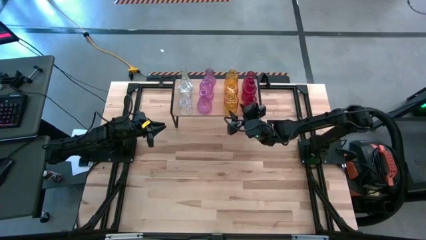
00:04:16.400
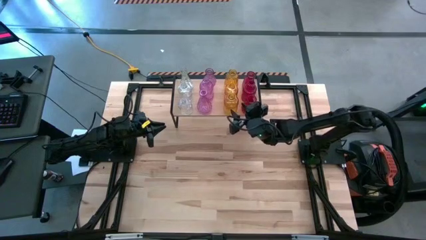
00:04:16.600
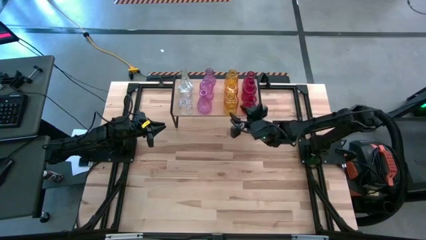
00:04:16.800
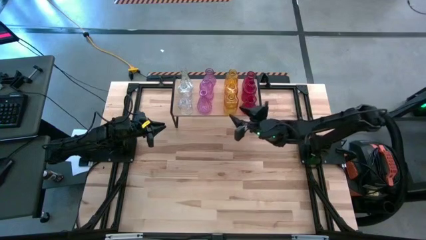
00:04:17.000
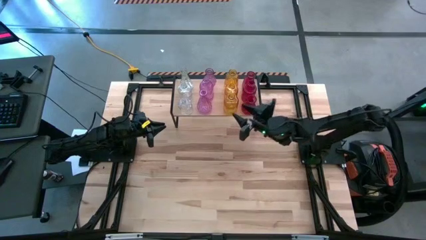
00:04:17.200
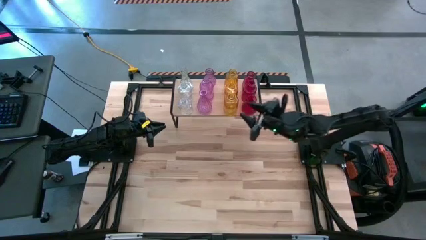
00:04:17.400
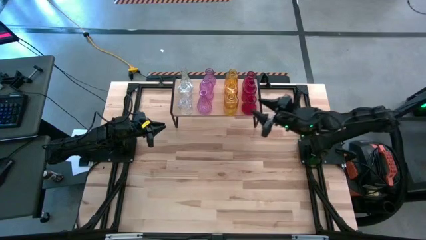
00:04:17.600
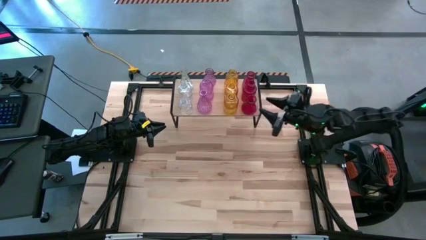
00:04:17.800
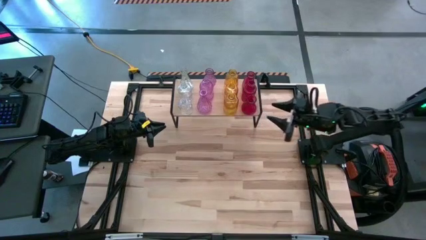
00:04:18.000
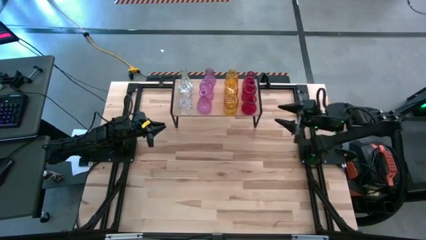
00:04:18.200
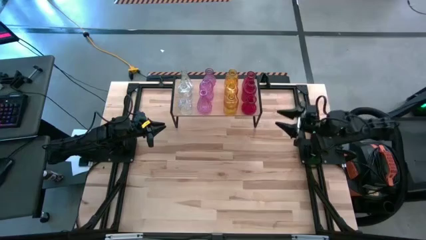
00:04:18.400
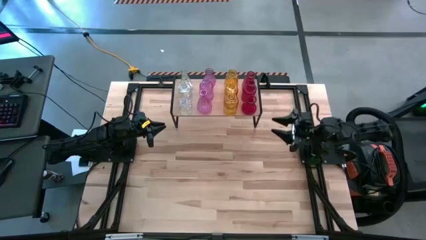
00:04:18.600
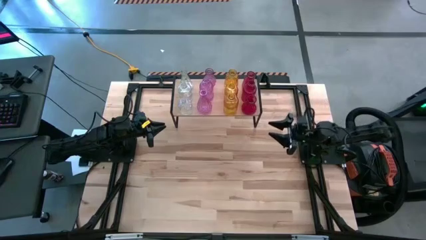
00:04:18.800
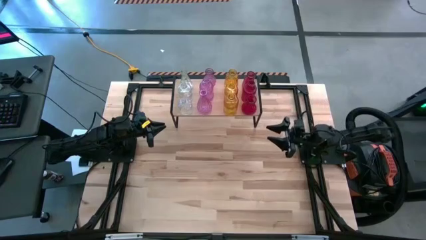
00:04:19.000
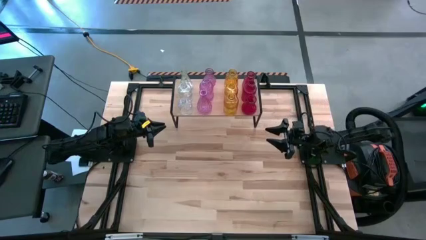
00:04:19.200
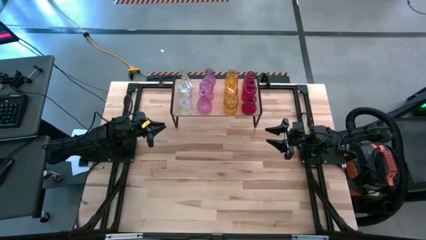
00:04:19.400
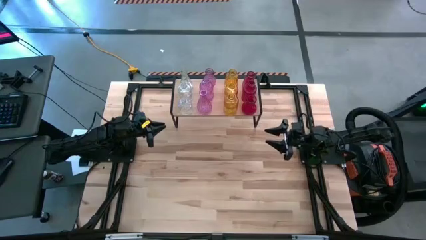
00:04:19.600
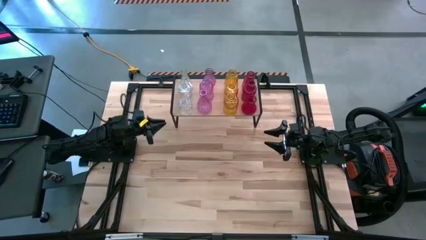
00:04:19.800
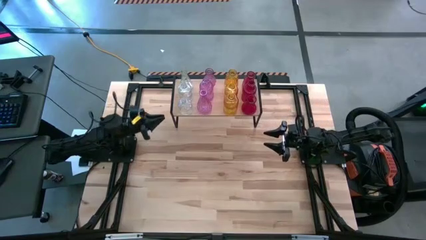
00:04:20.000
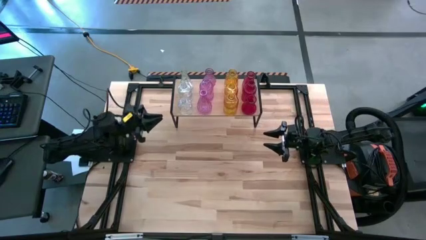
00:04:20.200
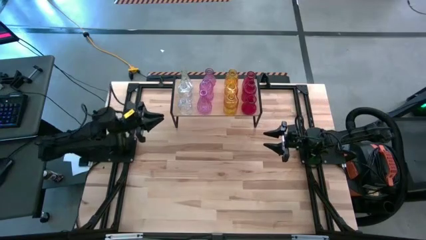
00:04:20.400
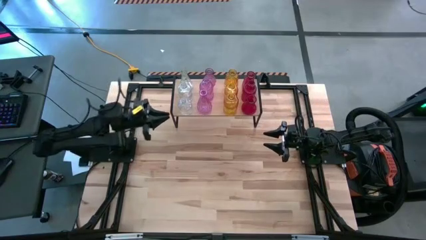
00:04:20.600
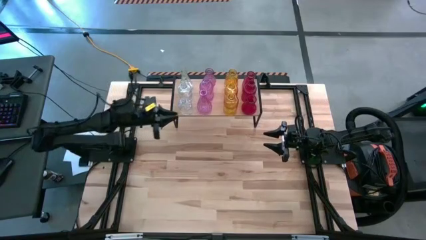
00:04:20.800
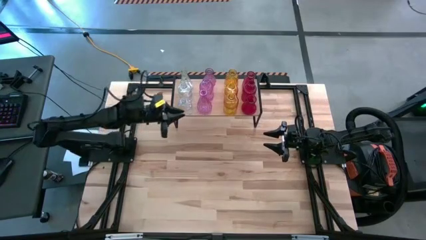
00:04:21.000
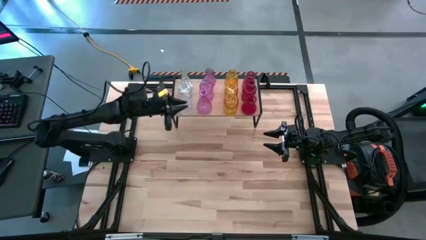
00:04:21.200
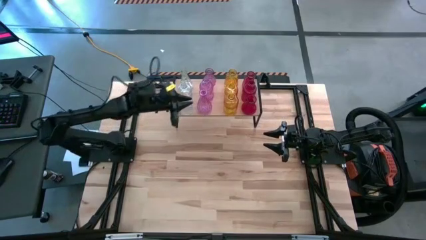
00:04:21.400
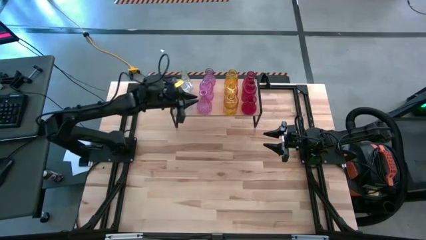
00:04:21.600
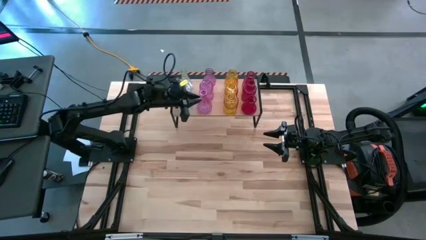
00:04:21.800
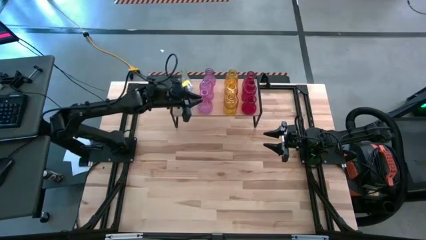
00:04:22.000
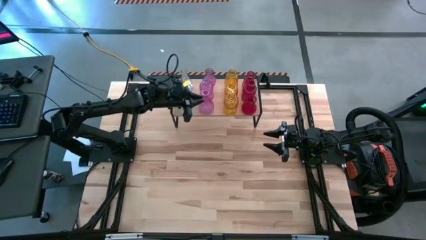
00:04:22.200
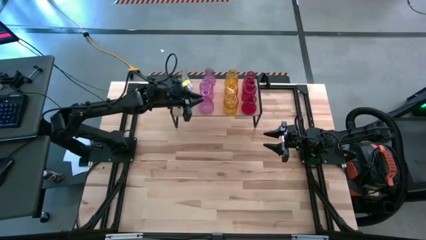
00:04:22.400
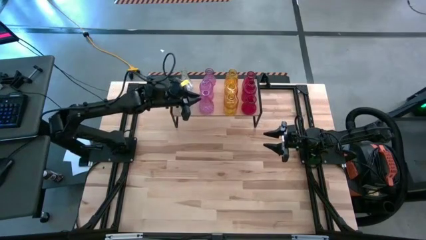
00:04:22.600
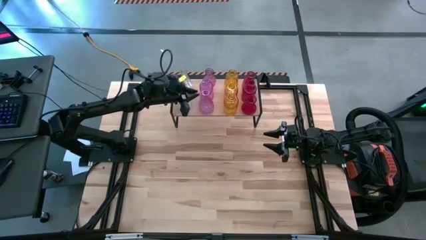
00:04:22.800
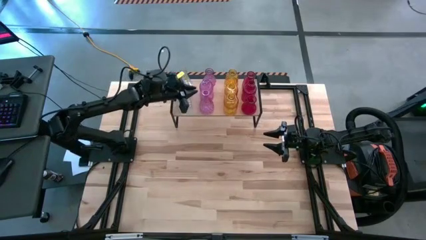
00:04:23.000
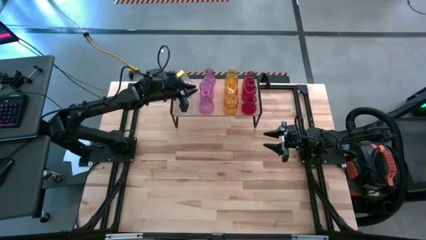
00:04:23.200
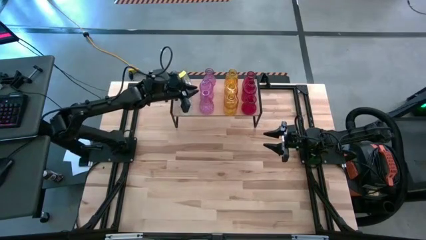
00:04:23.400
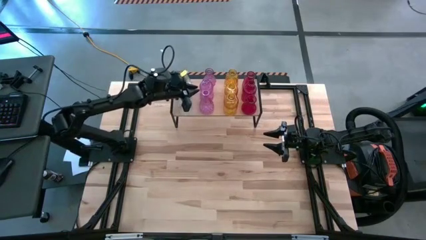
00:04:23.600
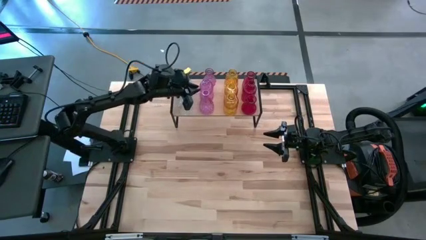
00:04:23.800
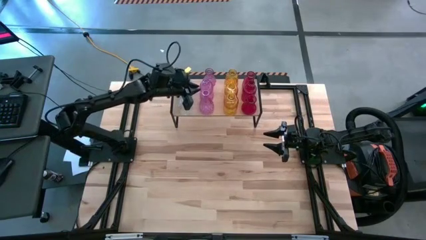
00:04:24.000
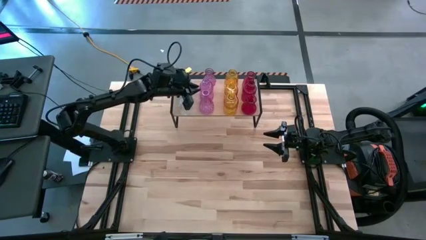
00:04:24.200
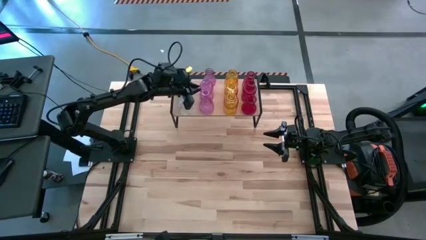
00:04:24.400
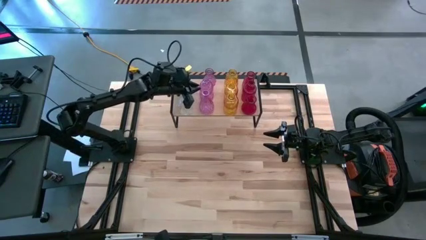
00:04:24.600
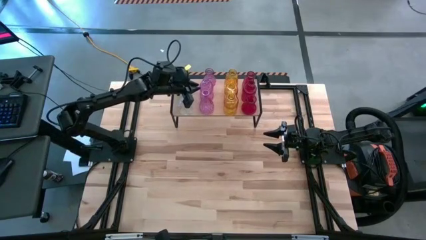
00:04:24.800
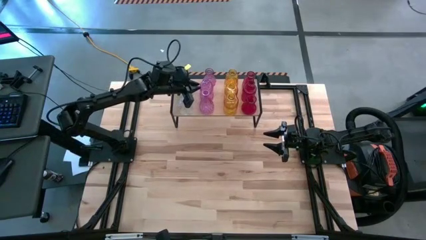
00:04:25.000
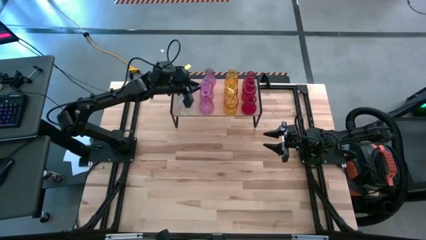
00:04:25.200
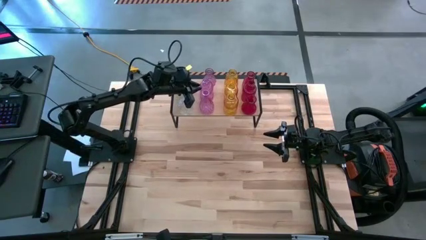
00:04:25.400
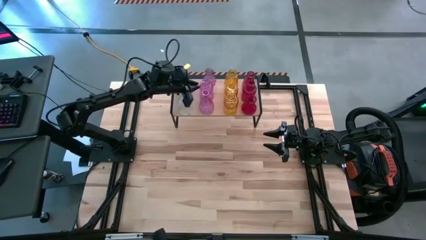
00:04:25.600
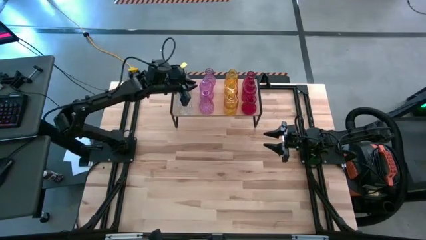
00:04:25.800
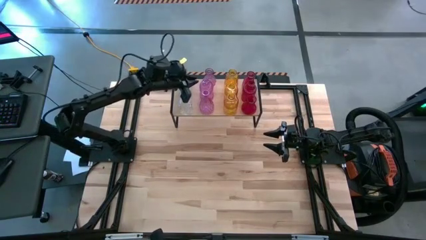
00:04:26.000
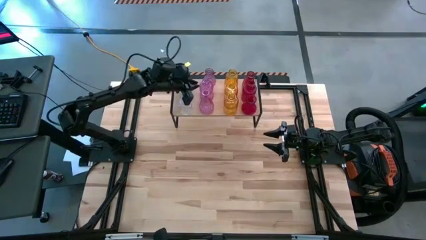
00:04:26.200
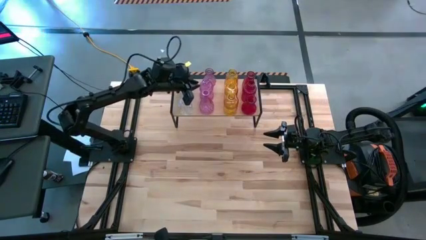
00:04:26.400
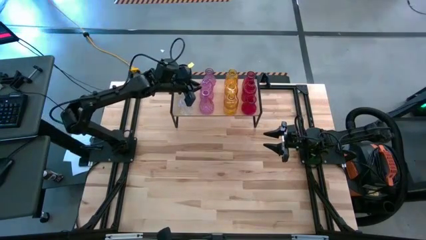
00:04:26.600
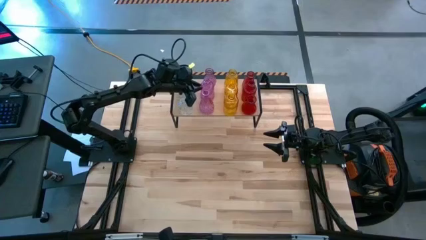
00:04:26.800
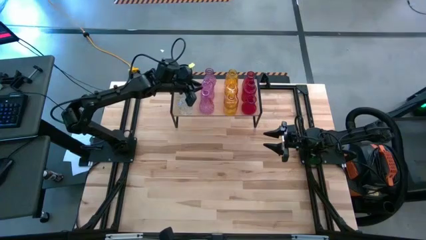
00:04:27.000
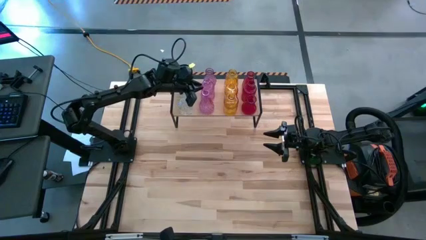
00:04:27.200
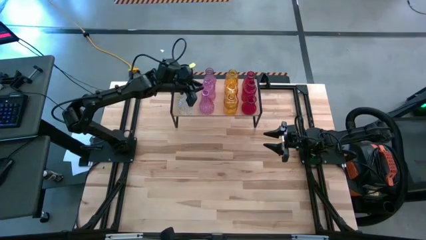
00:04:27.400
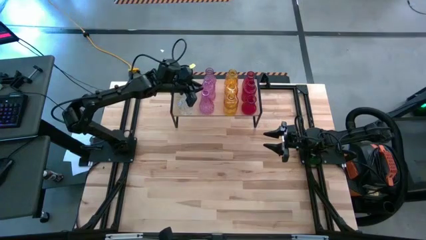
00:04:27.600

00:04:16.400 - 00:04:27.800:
Task: sort vases onto shelf
Adjust the purple vases on the shelf

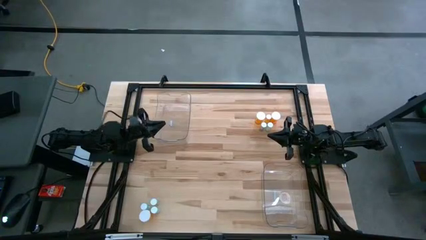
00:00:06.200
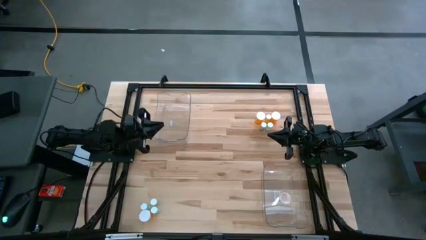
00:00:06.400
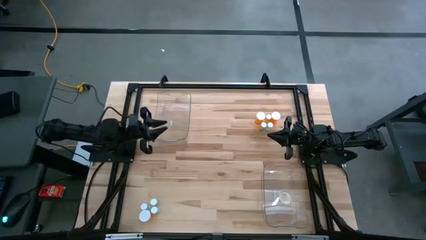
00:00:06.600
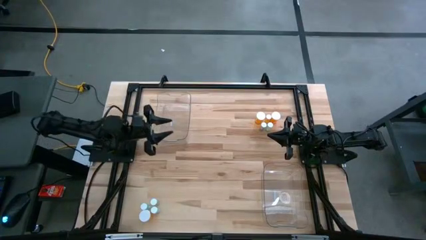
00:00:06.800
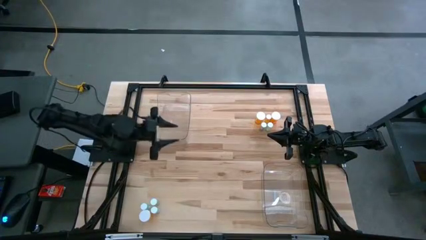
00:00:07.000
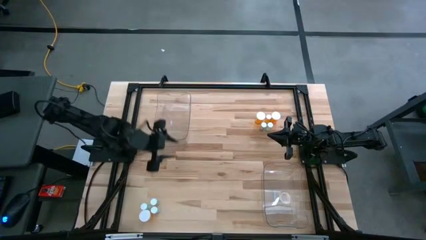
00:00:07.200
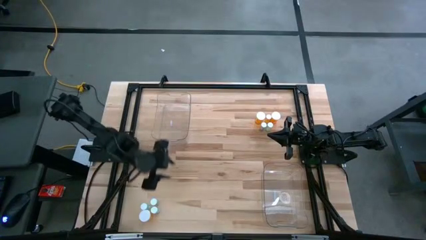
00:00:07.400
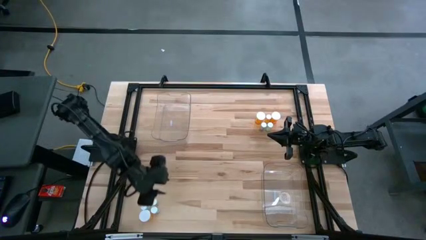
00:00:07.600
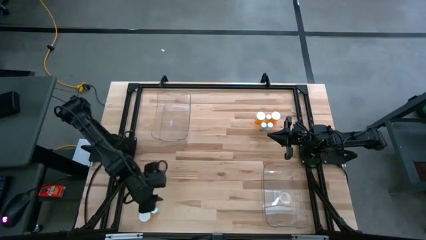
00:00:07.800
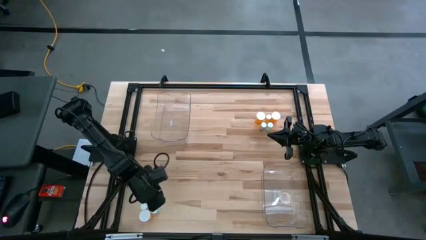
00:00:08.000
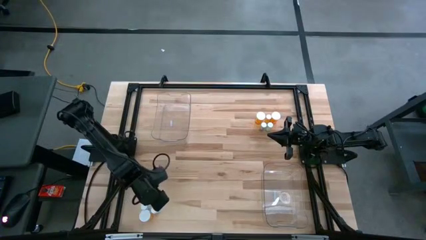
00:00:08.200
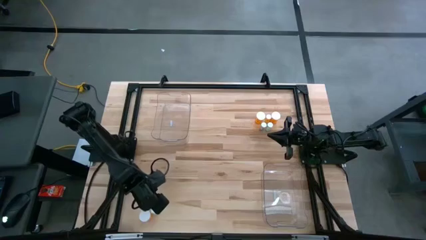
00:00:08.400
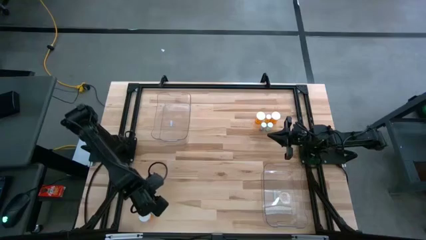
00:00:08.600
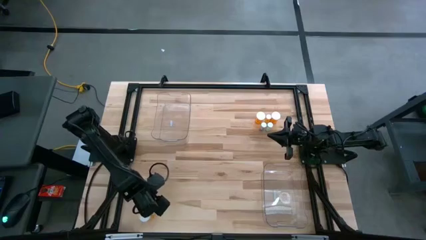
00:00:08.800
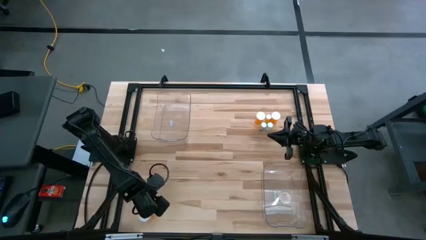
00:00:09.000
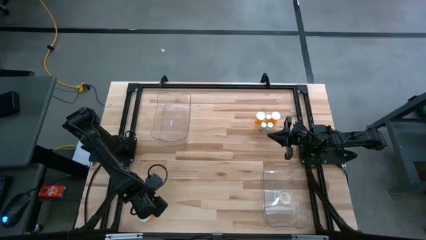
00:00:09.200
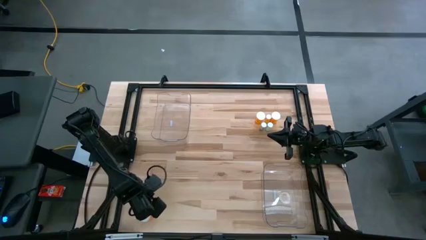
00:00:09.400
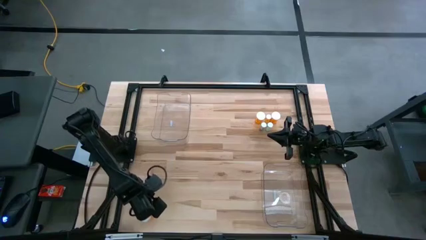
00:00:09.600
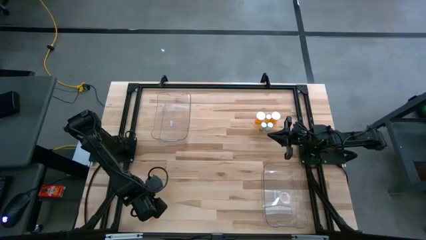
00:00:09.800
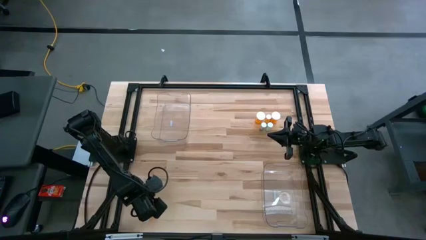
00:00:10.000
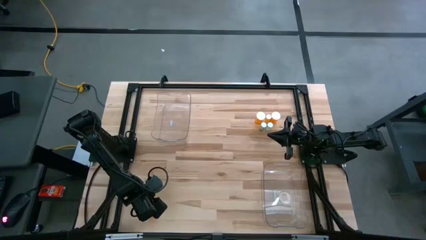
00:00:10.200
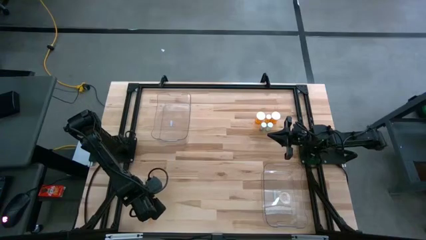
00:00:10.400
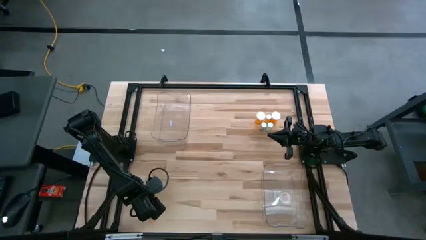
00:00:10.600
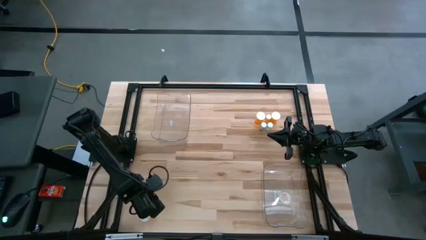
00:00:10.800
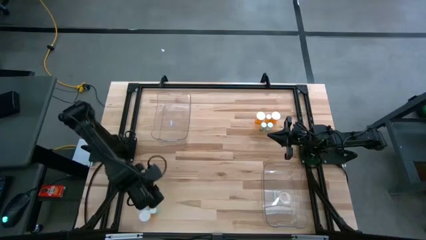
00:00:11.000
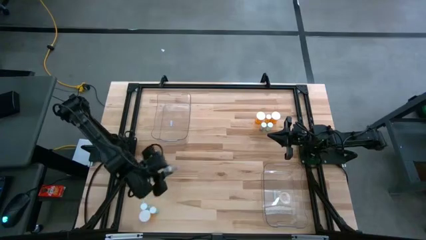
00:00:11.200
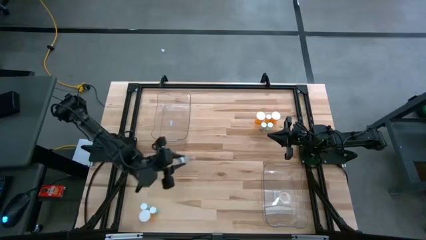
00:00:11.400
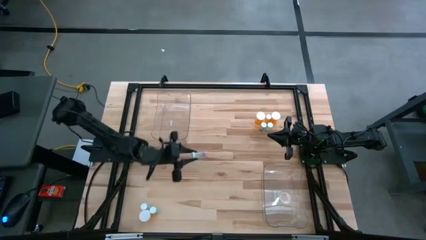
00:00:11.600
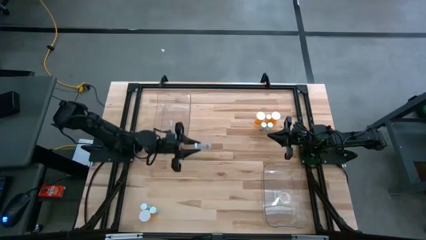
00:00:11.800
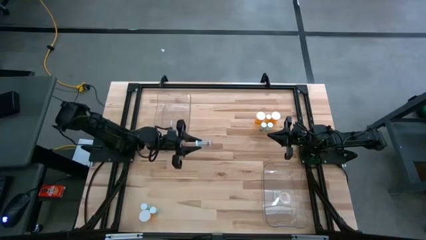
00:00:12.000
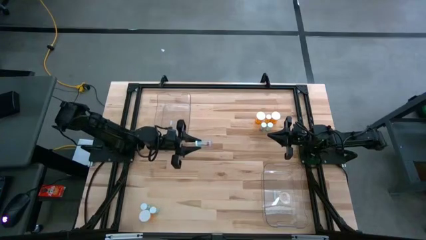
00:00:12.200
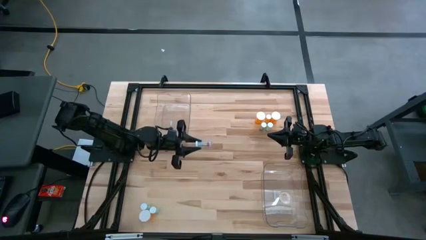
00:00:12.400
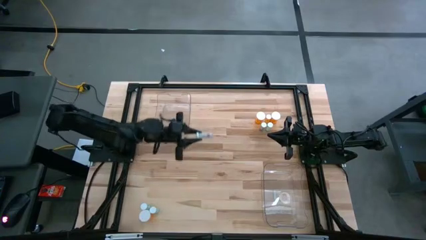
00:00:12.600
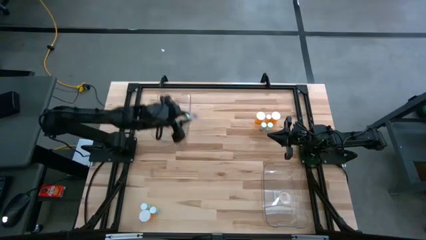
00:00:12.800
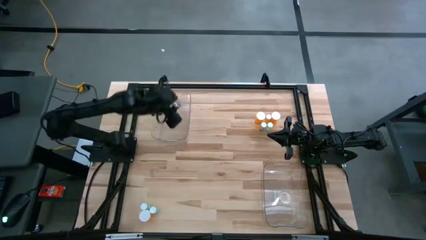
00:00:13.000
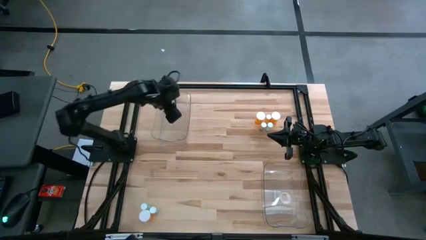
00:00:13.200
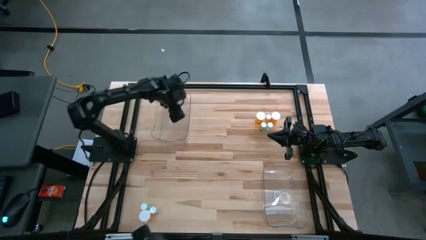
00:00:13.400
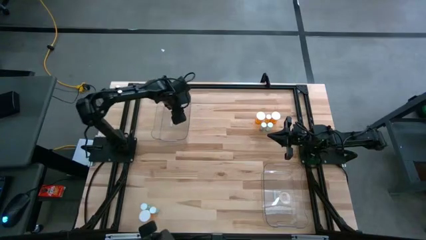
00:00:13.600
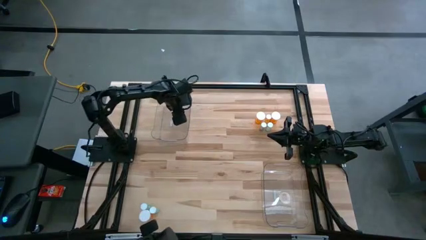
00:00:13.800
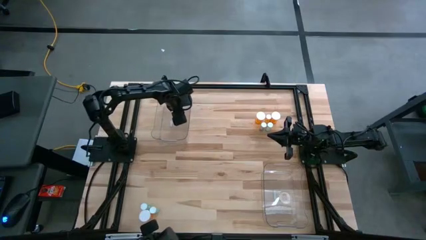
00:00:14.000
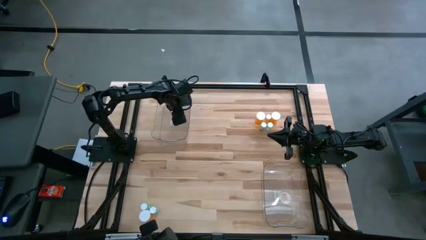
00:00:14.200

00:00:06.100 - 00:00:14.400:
Task: Pick and place medicine bottles into bin by pill shape (circle, oval)
Put the blue capsule bottle into the left transparent bin
